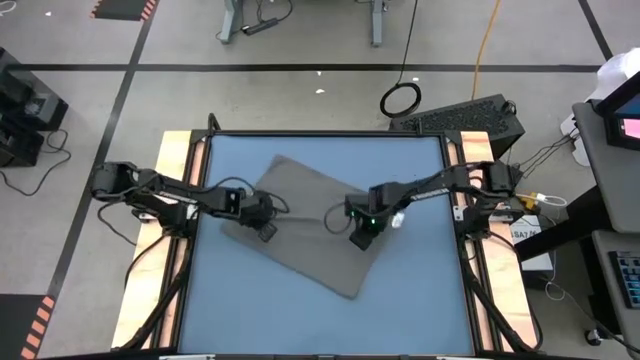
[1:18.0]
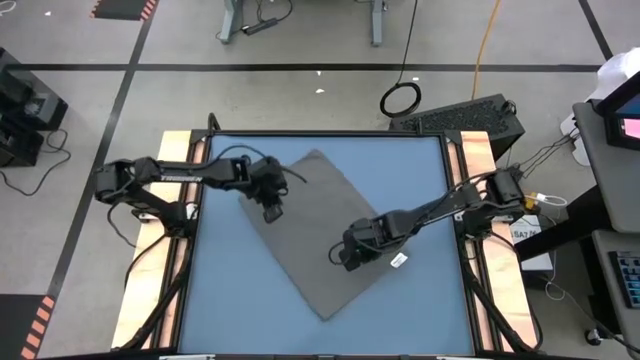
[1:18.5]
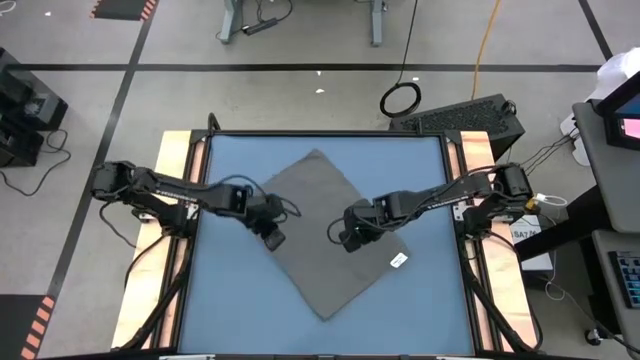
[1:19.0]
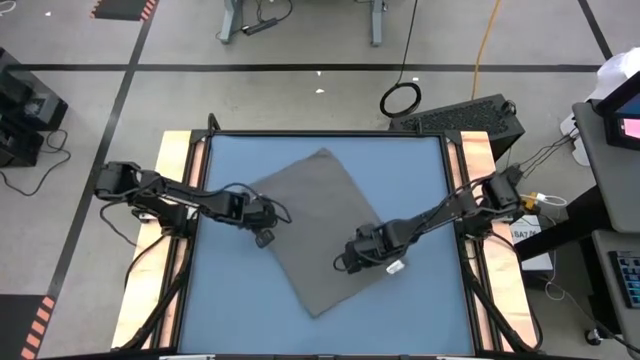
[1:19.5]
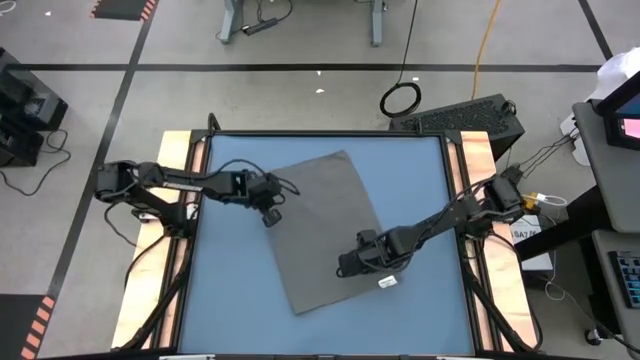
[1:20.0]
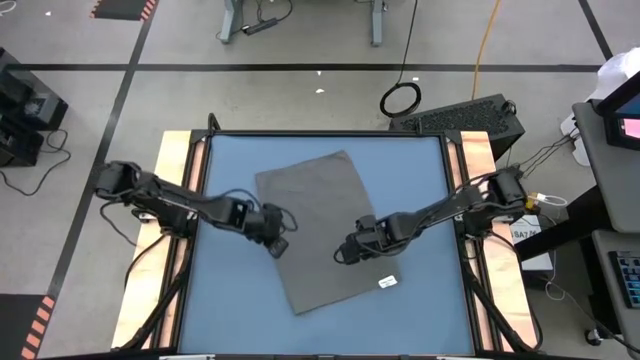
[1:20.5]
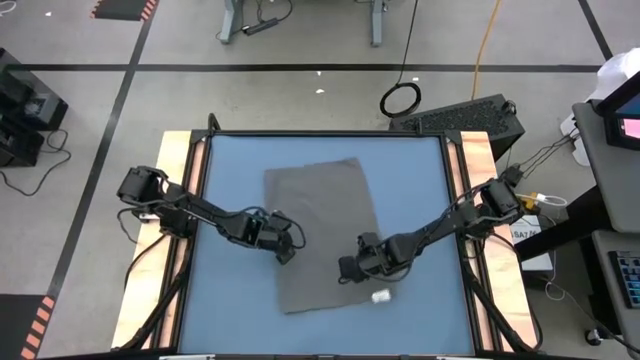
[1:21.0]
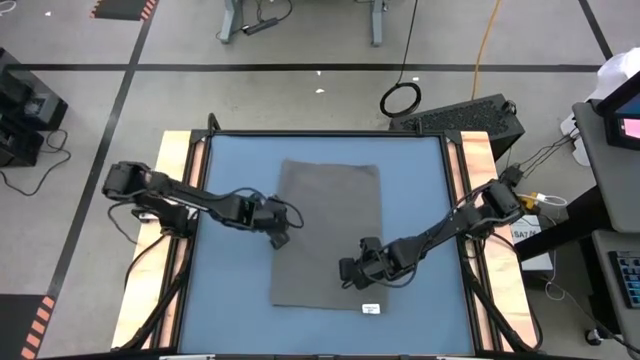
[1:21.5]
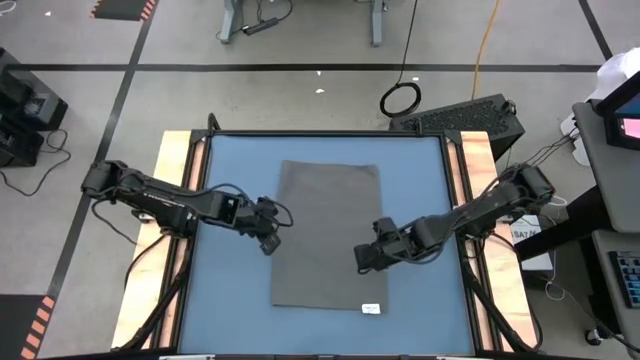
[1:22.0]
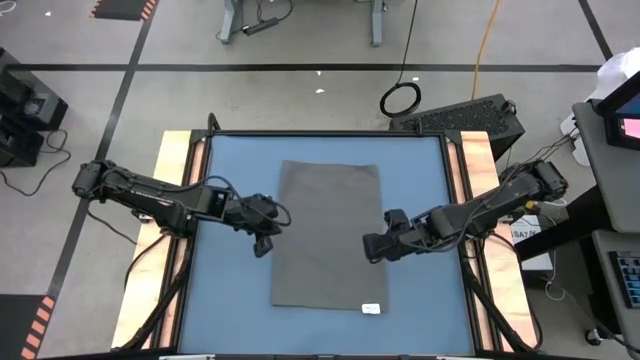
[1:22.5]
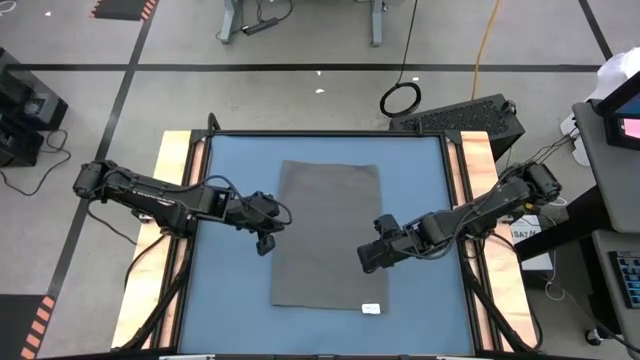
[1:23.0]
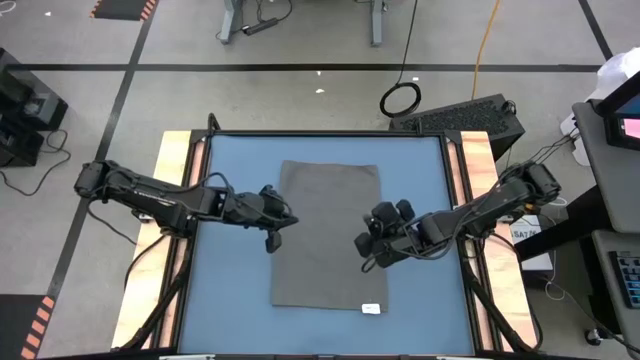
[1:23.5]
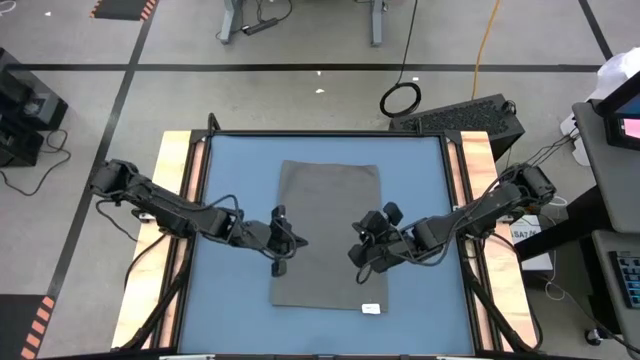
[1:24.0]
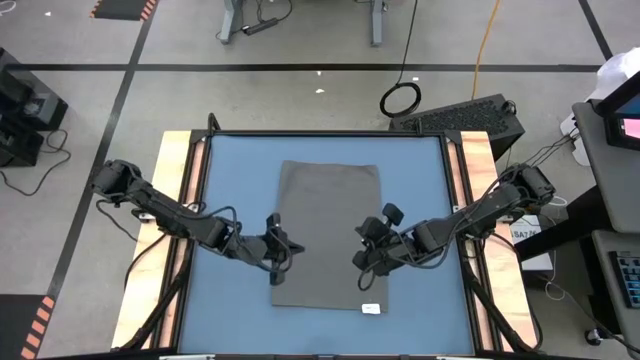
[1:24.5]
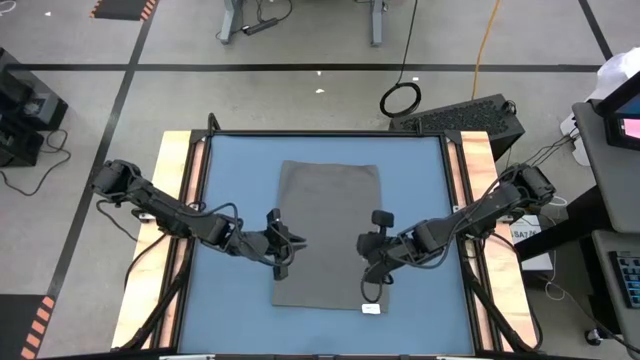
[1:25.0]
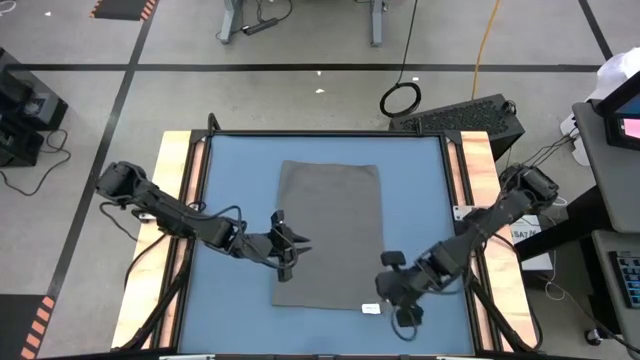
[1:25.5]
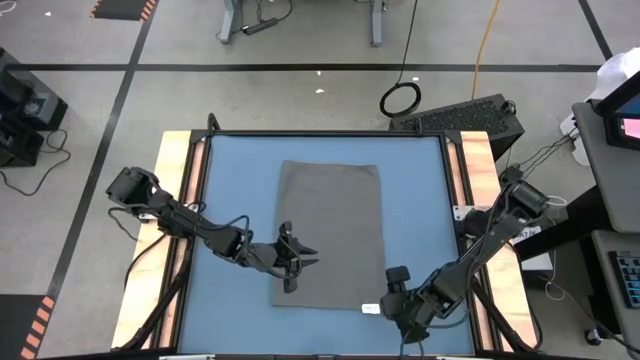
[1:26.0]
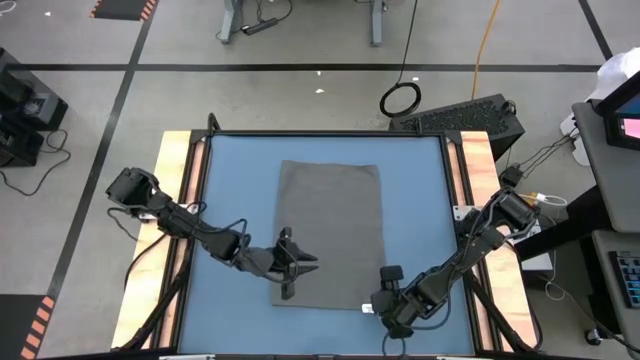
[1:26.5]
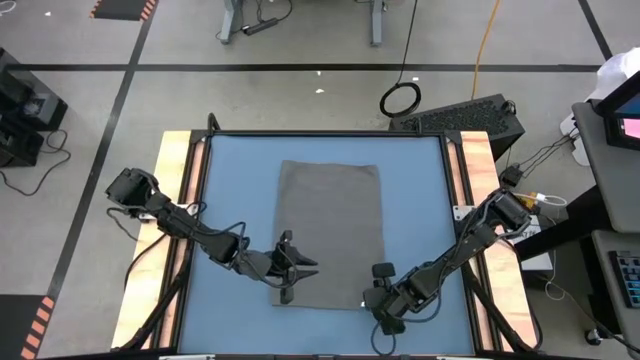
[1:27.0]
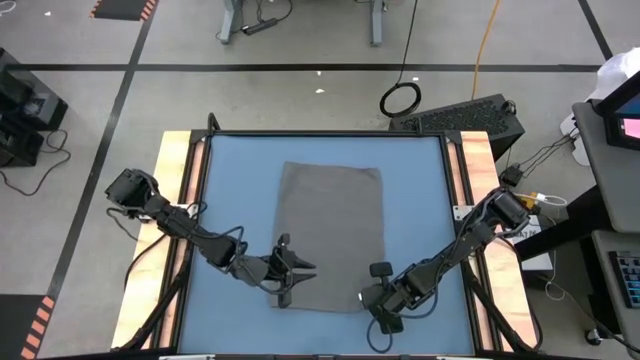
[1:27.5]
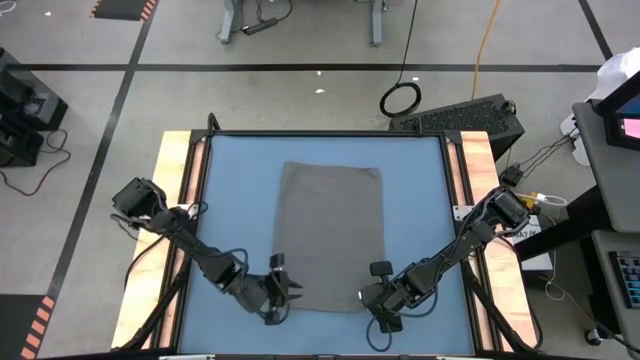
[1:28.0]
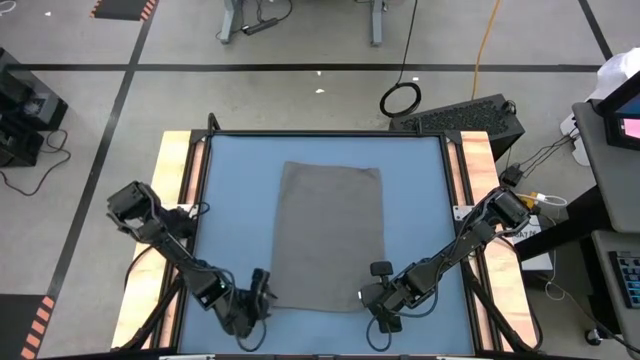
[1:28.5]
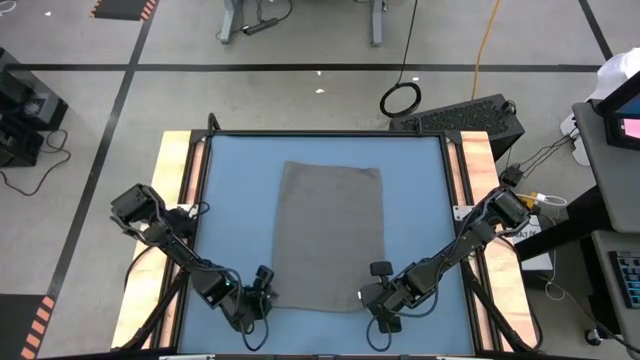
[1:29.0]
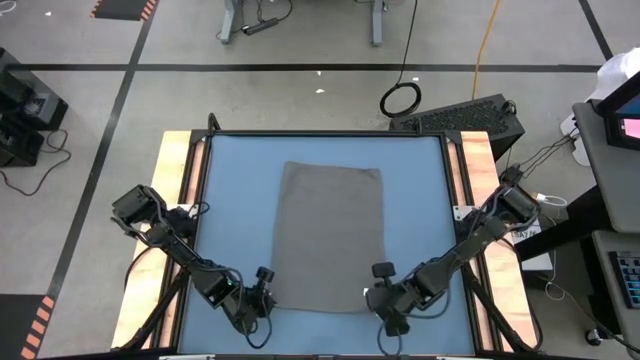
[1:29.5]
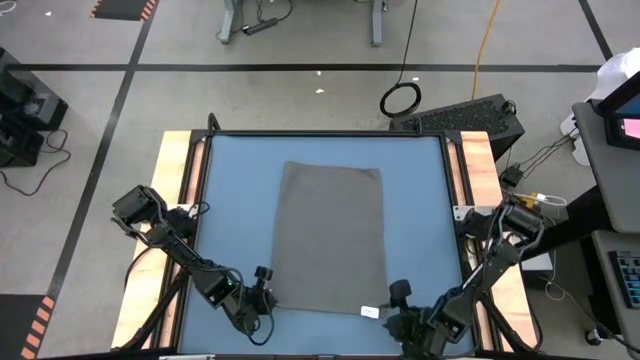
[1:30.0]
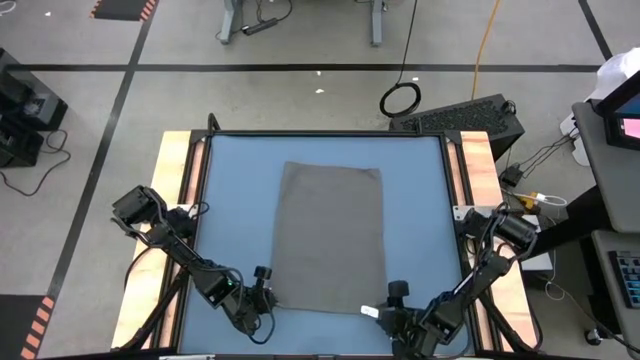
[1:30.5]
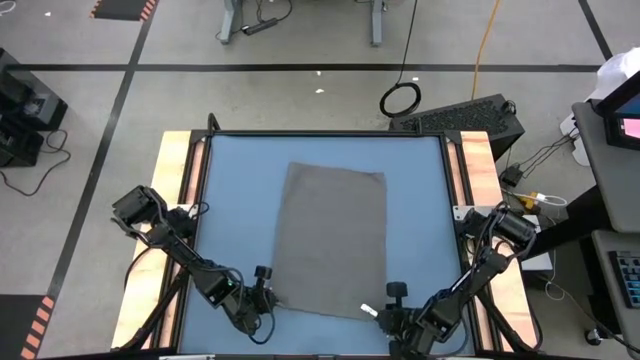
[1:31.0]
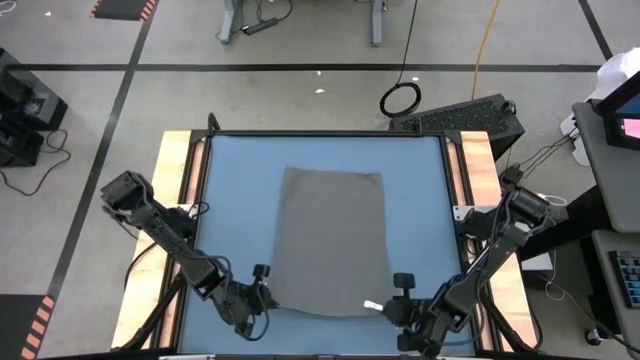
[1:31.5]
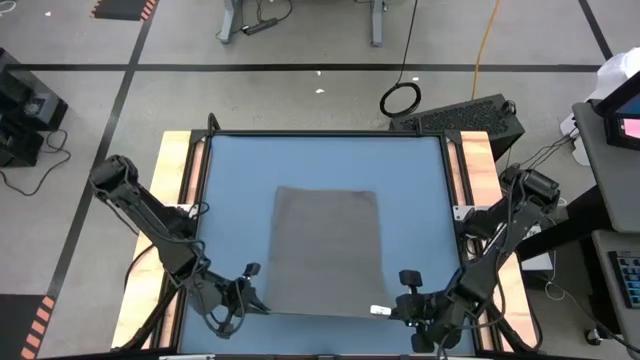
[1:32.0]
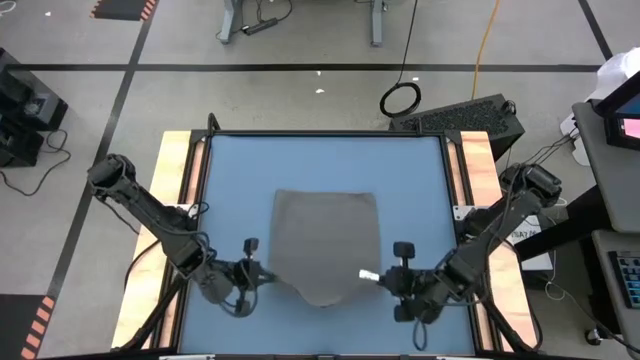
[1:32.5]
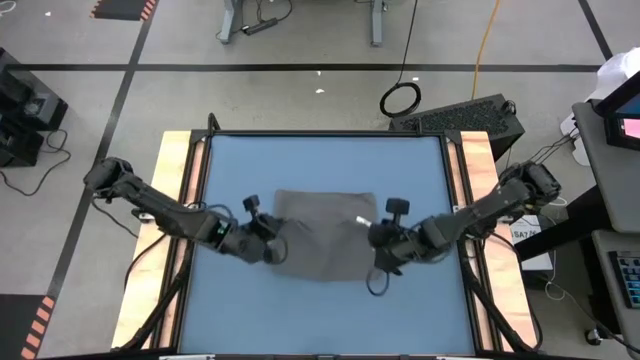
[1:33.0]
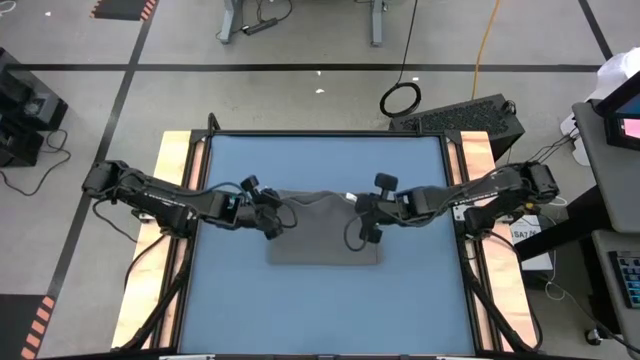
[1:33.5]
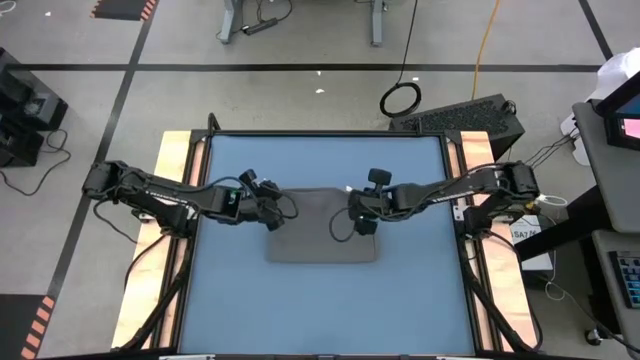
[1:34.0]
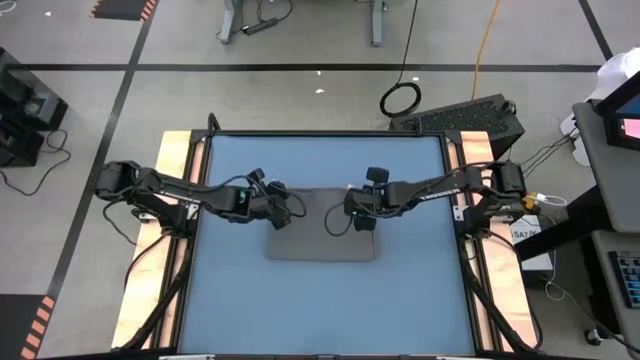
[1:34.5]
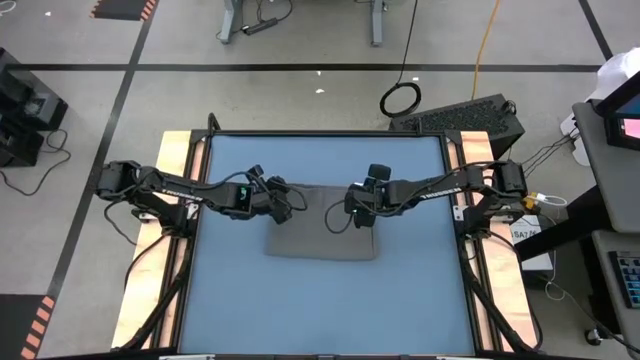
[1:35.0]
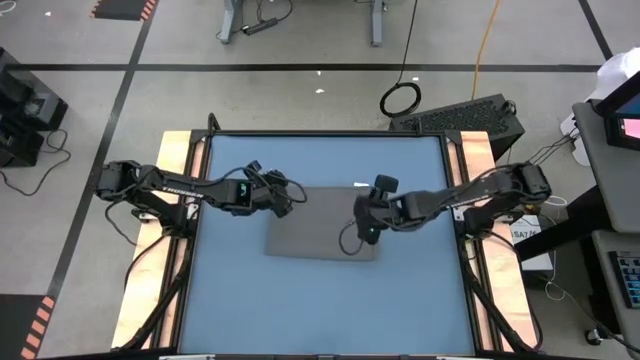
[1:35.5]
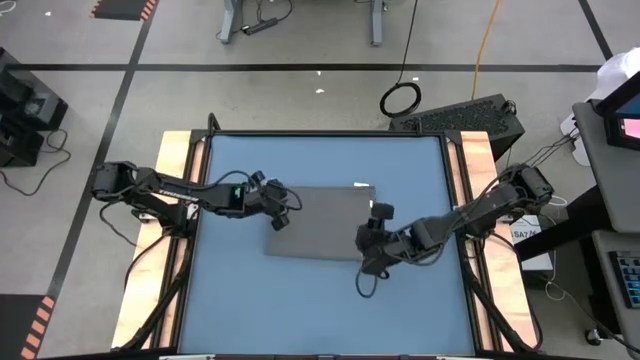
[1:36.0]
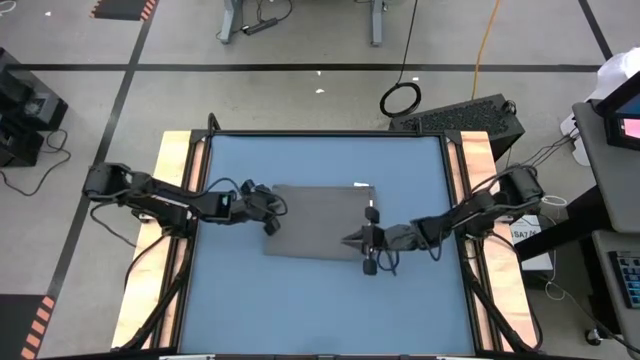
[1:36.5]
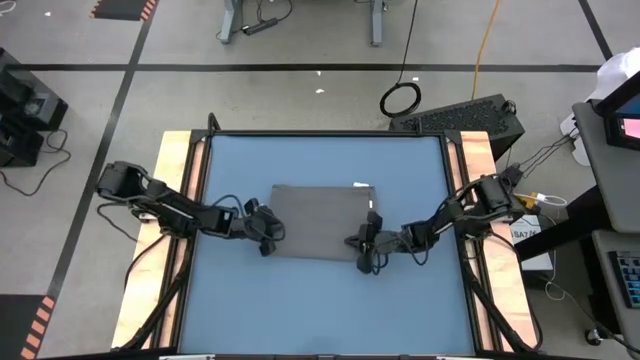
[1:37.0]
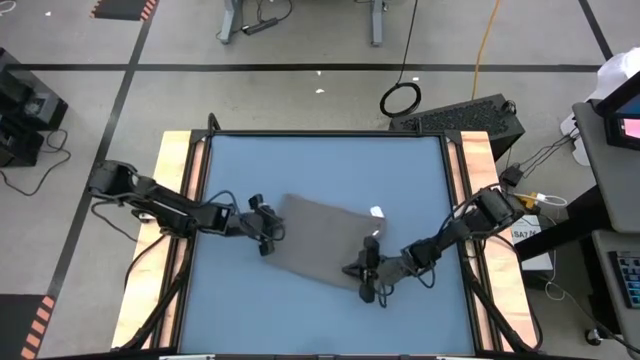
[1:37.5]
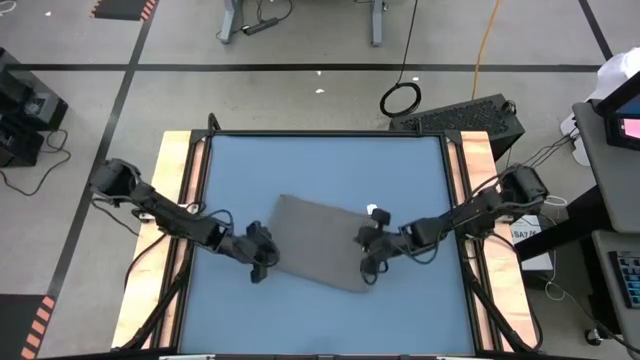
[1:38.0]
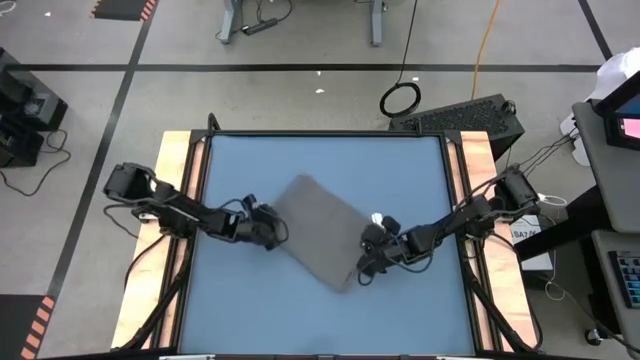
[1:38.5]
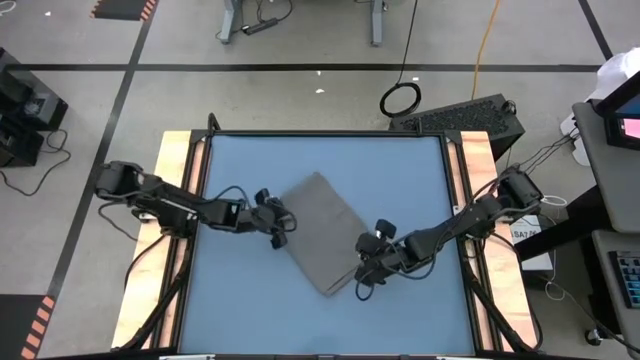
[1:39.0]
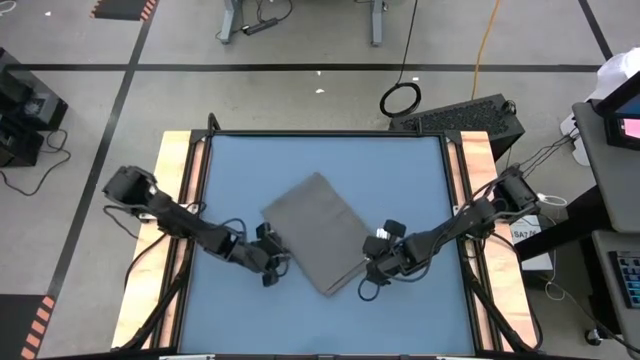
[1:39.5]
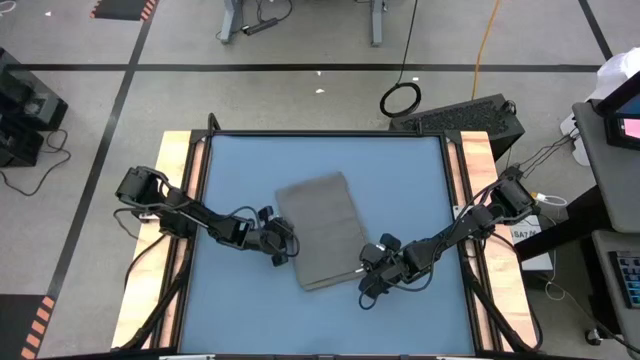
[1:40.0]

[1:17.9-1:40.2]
Task: Roll towel
Roll the gray towel
